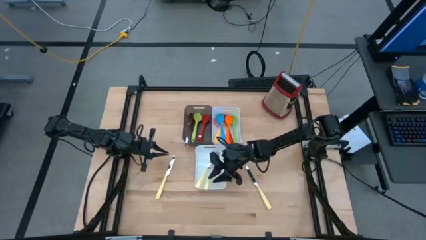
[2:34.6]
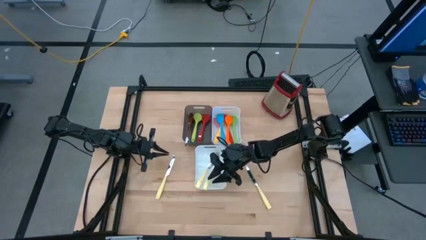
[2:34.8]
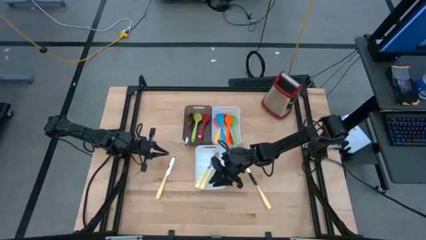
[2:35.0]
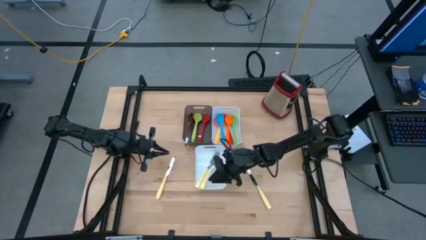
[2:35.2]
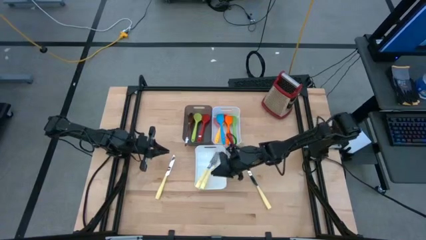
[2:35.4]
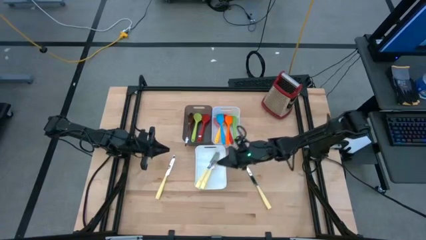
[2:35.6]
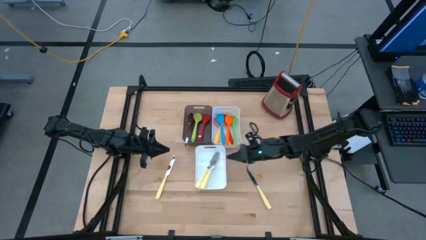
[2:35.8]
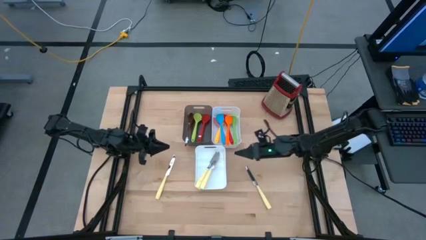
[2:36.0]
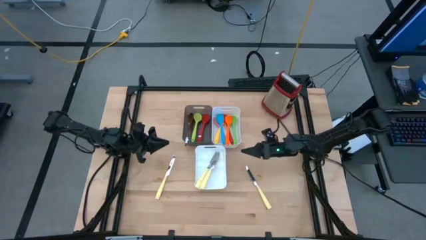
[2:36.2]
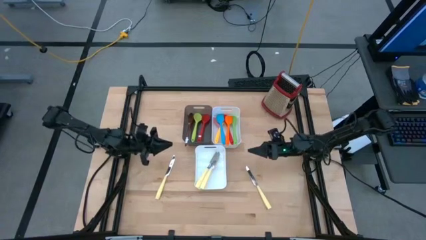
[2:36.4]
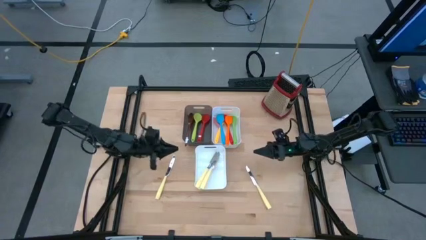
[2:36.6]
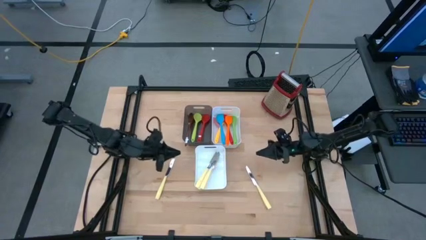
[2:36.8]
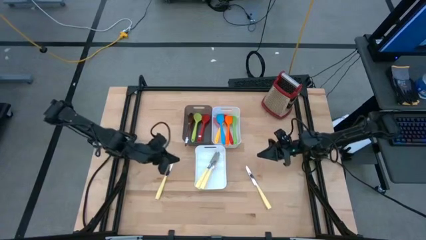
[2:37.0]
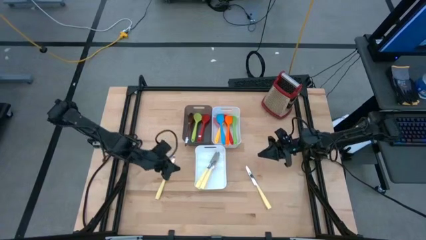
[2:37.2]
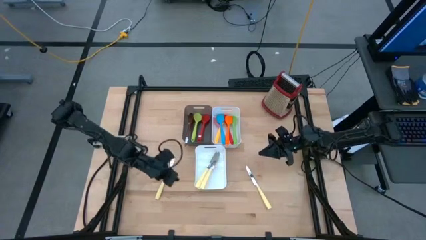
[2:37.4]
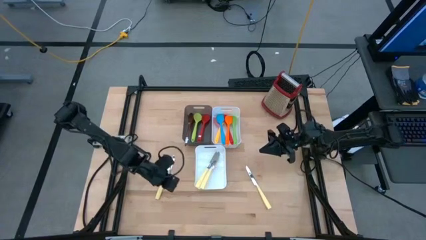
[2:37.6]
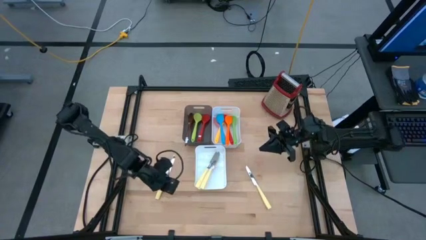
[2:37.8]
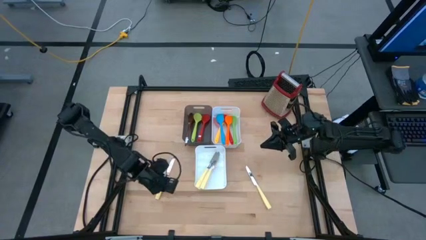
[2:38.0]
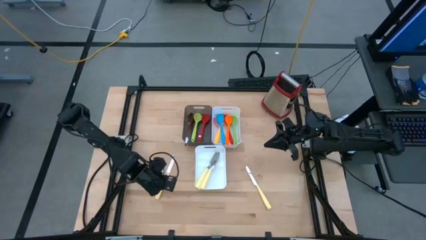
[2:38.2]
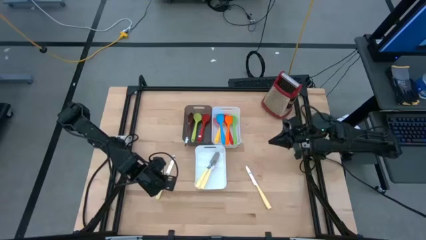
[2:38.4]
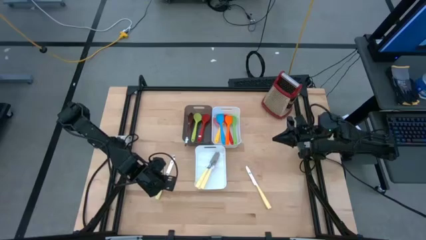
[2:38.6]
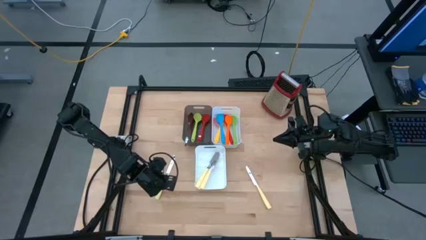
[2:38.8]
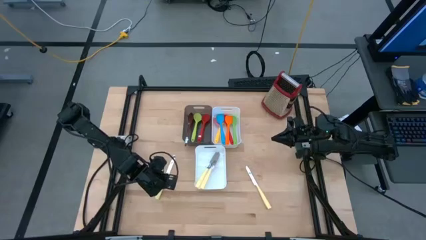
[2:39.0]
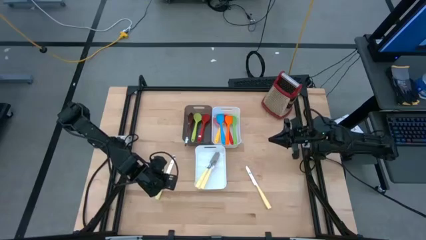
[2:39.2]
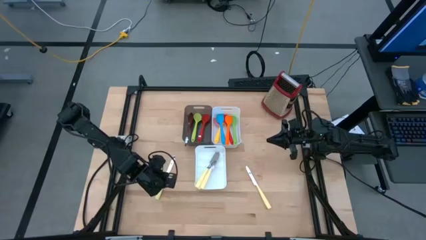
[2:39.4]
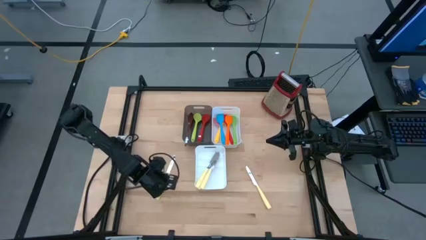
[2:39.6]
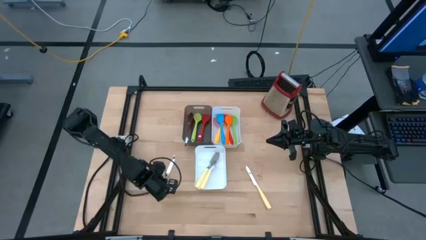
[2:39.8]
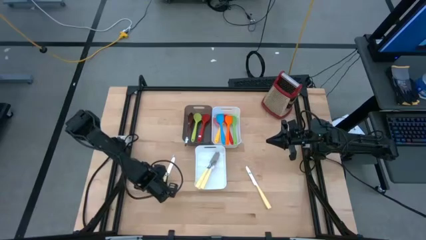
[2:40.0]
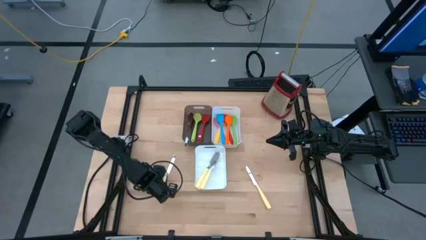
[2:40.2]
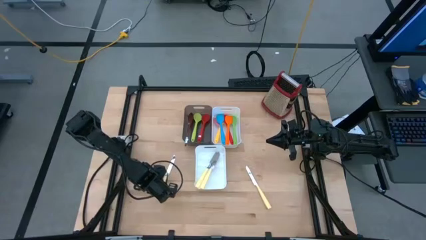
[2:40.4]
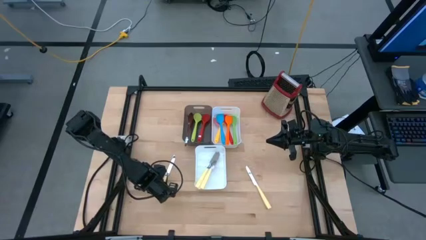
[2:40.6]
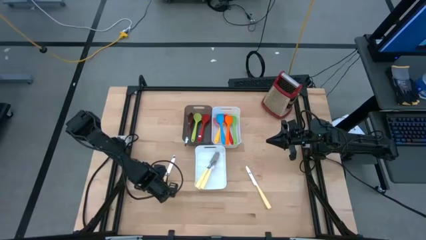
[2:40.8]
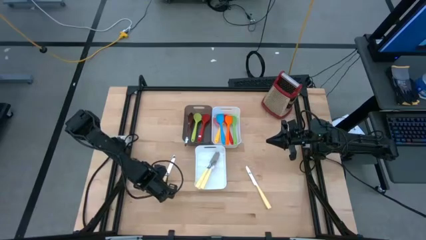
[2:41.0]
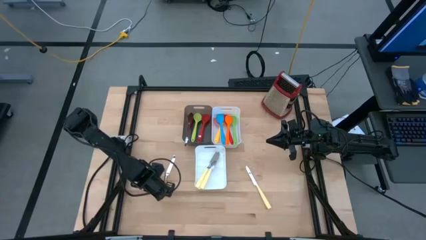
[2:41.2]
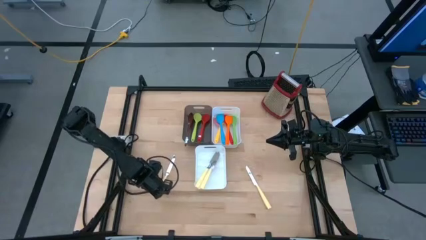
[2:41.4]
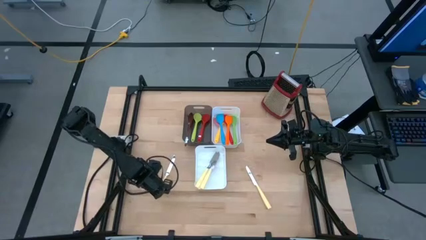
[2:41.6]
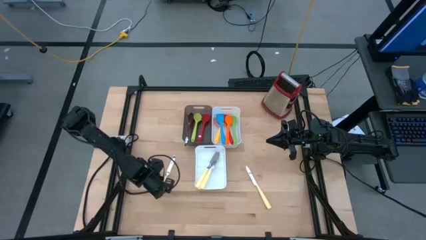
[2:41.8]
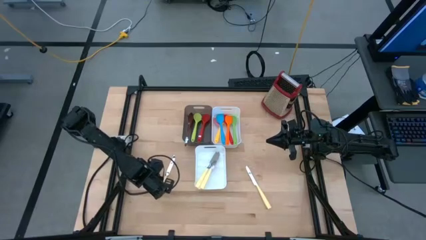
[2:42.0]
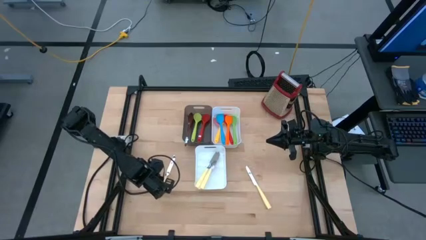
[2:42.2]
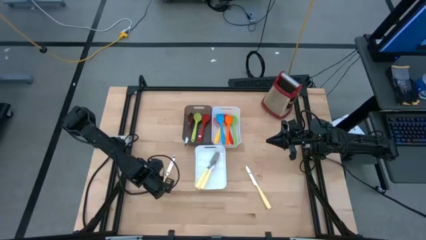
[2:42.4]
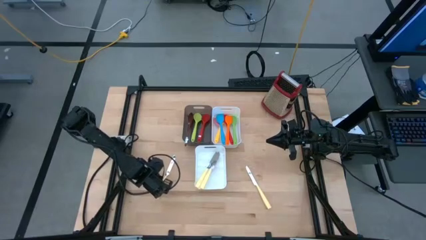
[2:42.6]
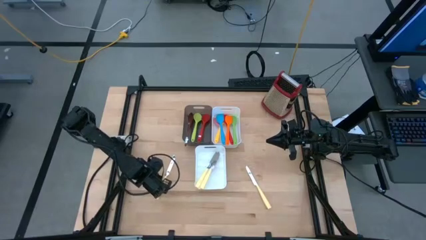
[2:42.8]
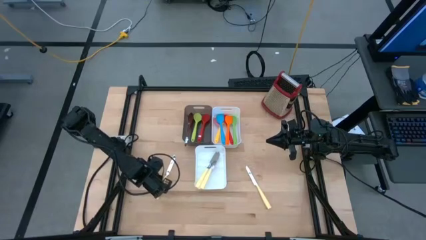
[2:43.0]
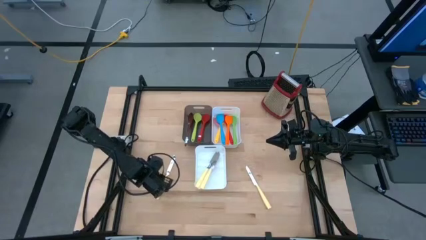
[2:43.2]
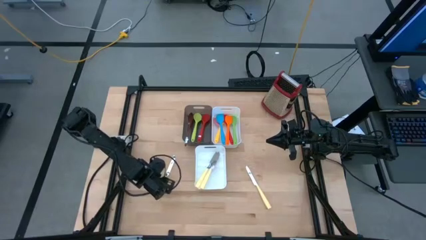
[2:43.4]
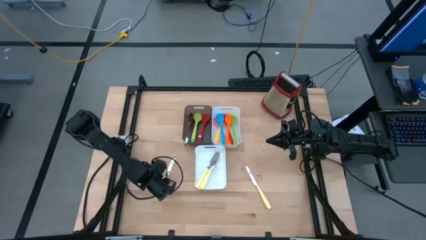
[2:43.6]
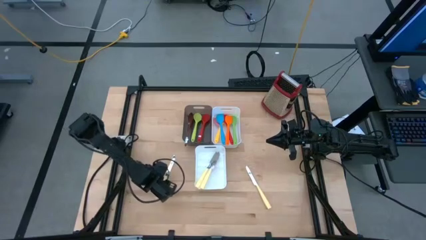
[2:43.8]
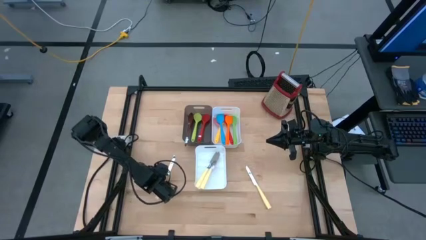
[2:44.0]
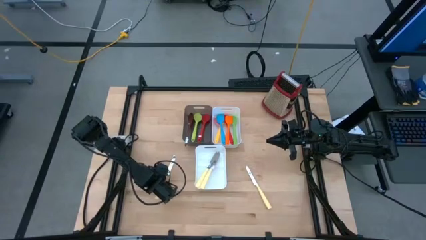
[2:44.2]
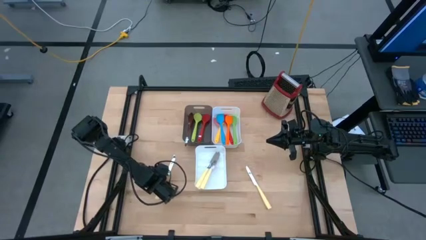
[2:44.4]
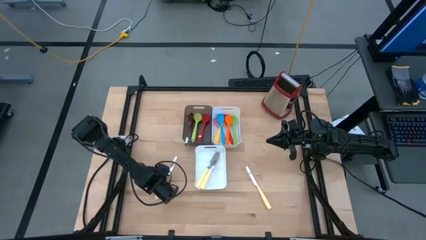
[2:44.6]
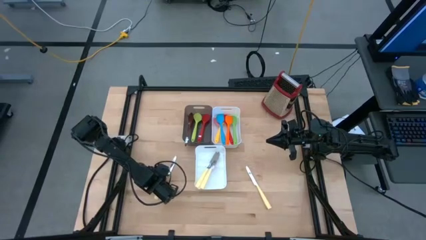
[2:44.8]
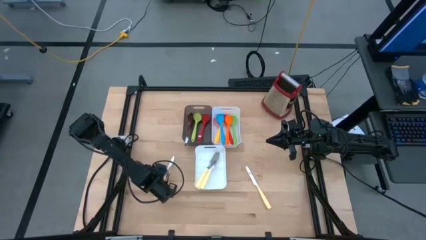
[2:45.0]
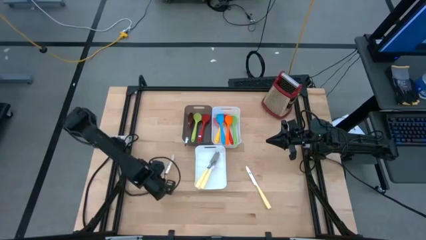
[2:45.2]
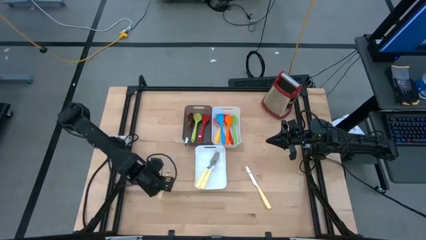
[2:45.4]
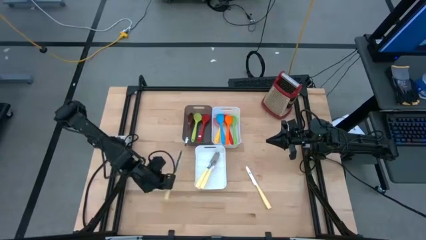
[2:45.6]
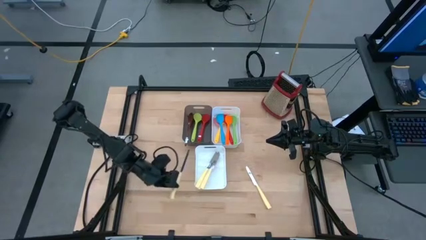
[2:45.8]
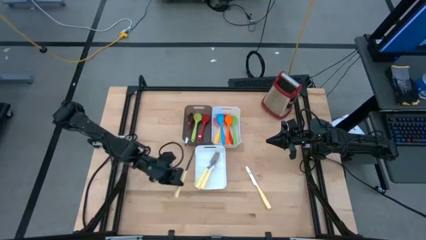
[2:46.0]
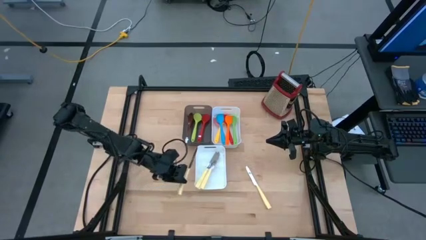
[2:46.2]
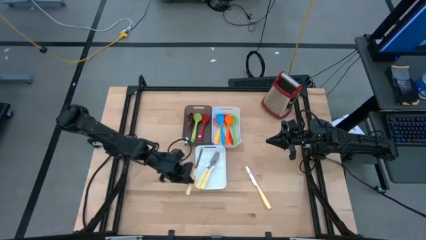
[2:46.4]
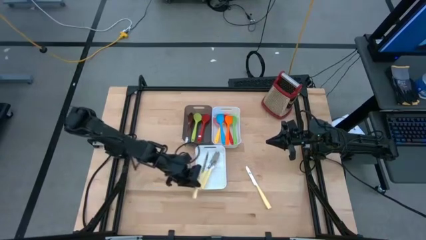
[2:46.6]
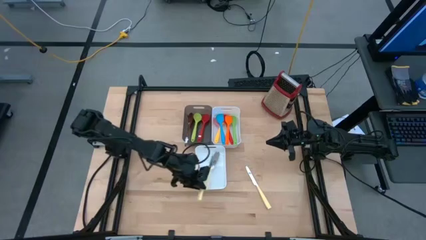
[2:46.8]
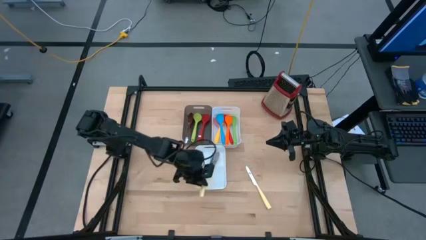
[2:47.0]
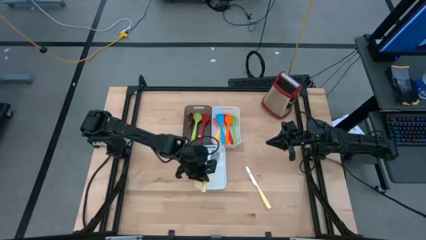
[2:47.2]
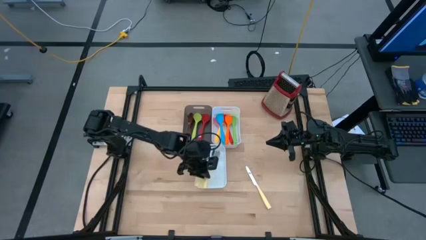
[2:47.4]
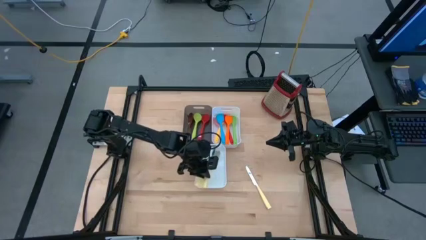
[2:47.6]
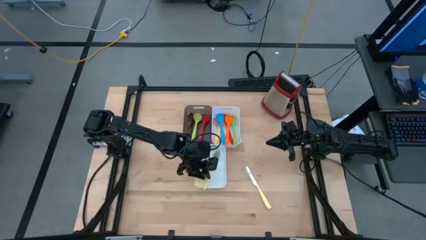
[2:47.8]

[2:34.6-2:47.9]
Task: Pick & Place Kitchen Items
Put the yellow knife into the bottom white bin
